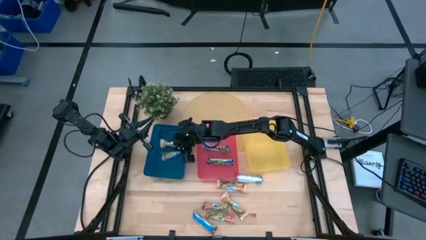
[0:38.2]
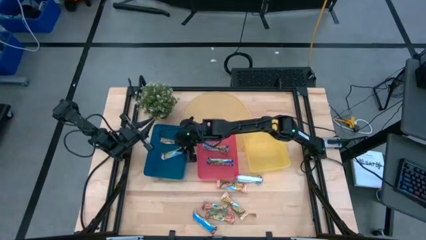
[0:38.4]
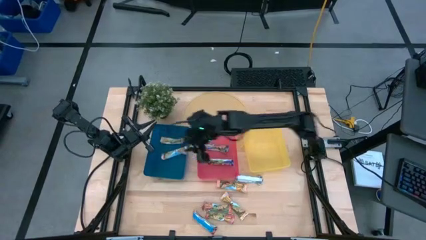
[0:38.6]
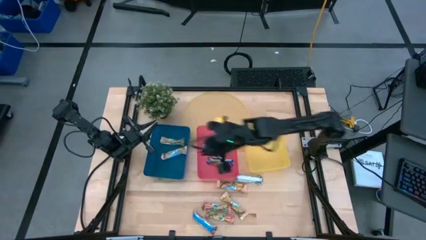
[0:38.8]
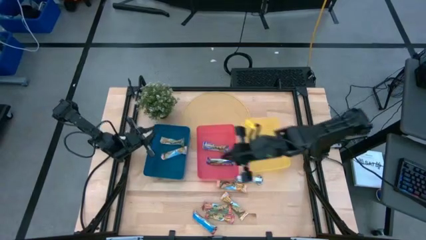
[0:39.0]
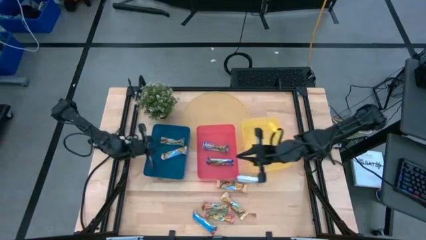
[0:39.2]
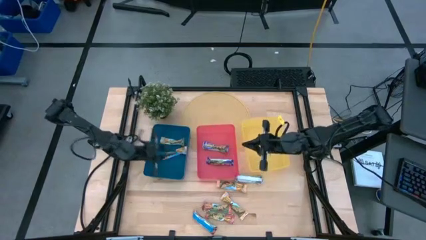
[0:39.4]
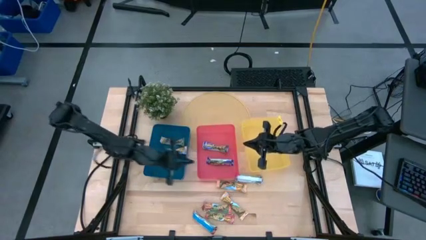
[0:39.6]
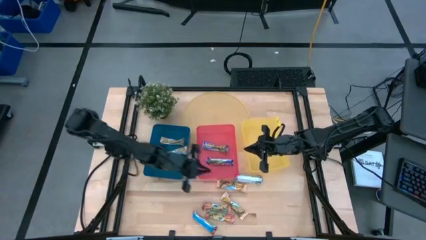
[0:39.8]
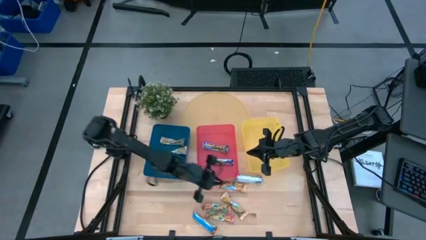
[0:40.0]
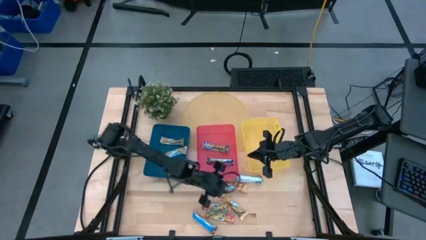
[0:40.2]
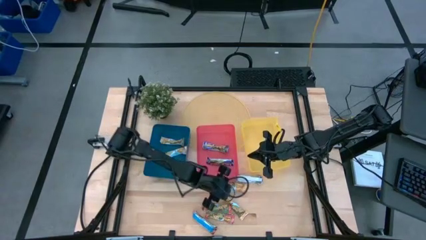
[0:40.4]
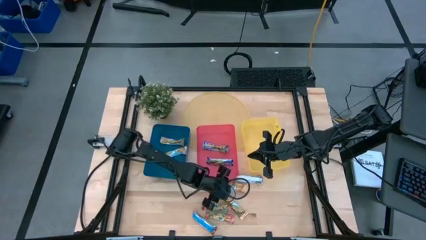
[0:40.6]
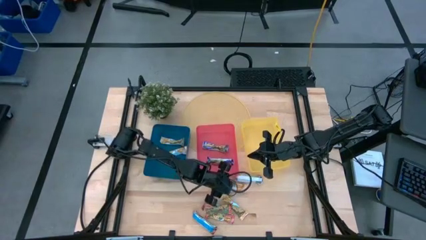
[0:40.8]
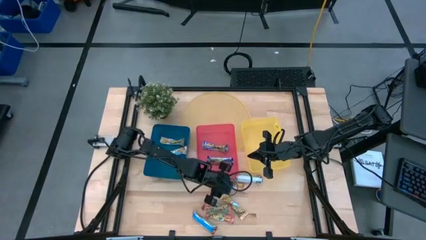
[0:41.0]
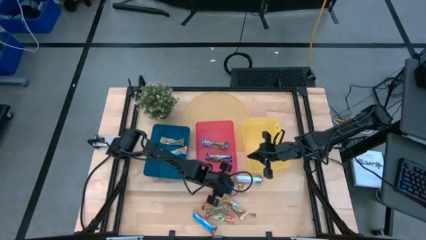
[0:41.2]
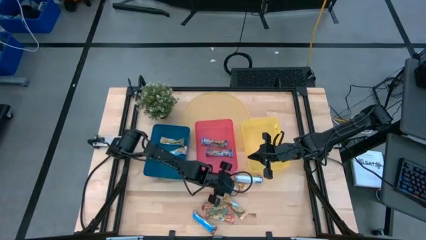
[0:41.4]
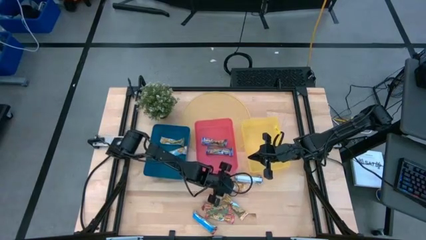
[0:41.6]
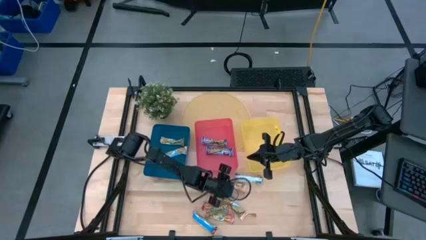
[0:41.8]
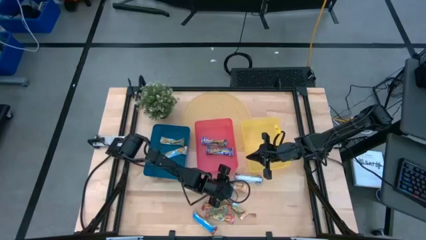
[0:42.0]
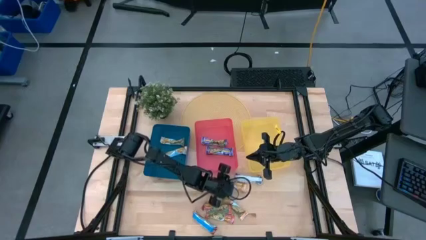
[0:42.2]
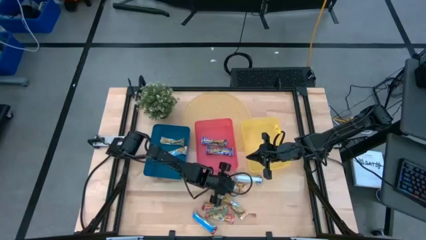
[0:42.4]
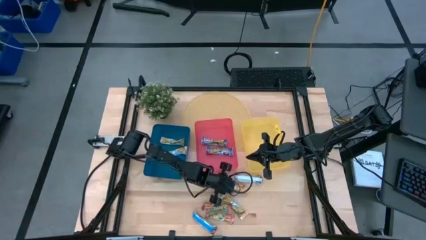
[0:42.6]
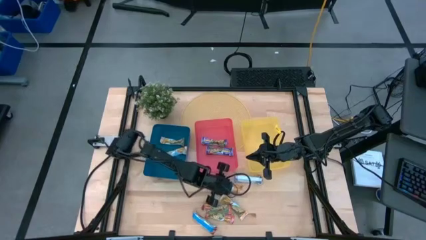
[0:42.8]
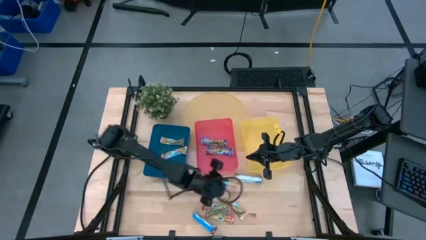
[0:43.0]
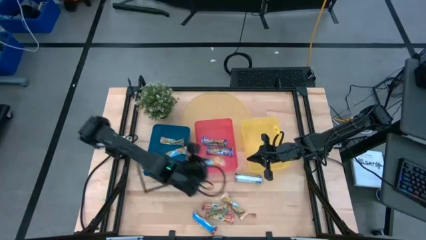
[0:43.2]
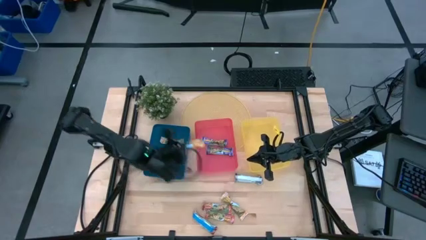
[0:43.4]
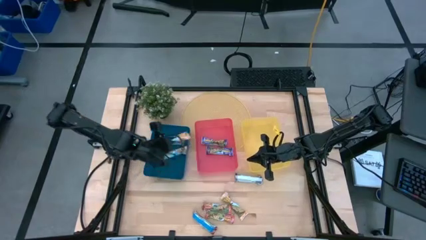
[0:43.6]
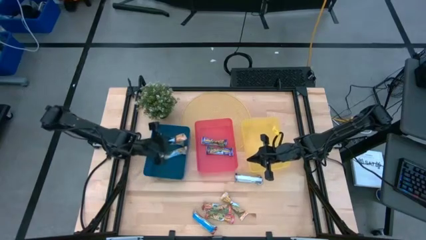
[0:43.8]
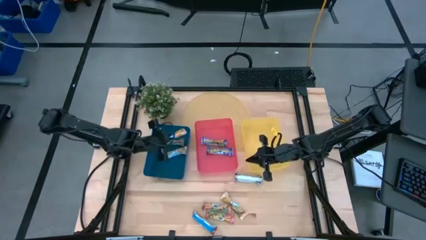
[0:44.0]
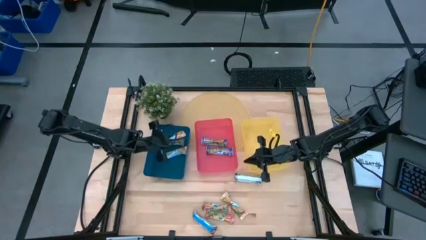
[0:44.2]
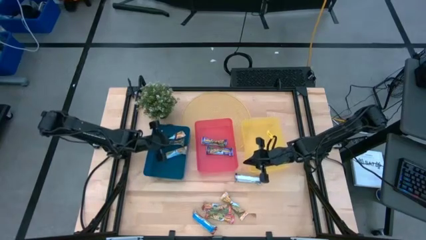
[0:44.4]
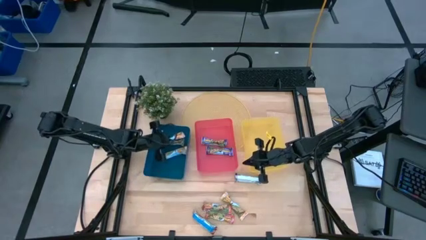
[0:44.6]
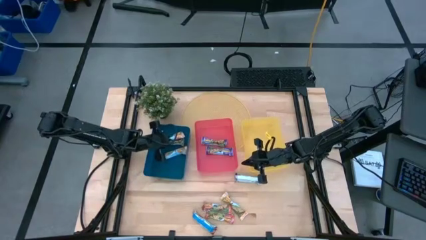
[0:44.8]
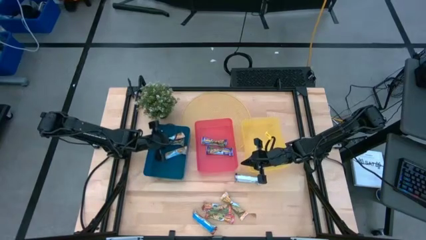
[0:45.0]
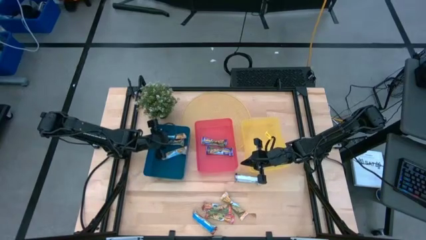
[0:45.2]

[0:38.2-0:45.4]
Task: Pick and place Granola Bars by type
Put the yellow granola bar into the blue bin

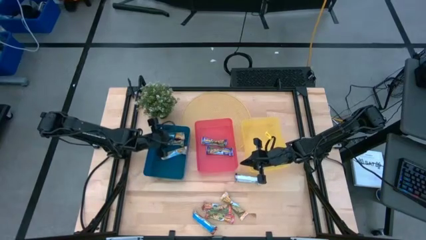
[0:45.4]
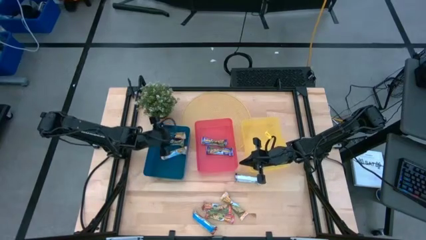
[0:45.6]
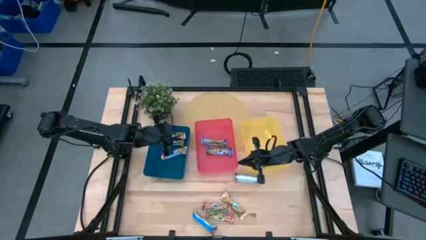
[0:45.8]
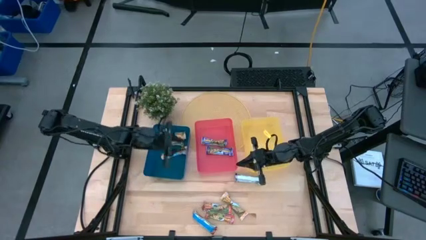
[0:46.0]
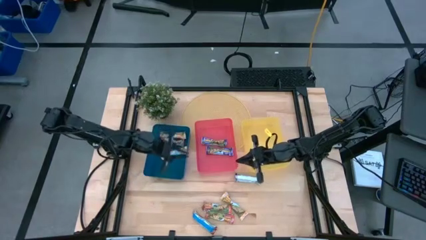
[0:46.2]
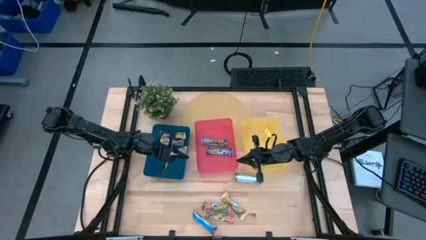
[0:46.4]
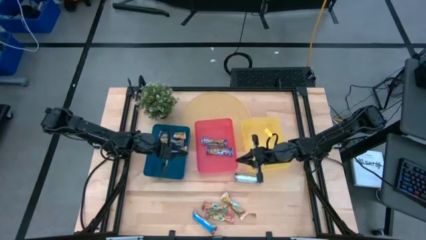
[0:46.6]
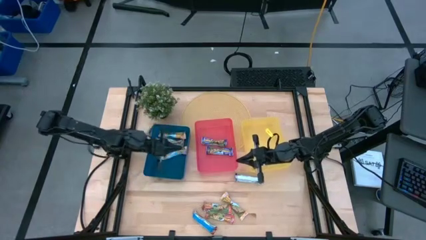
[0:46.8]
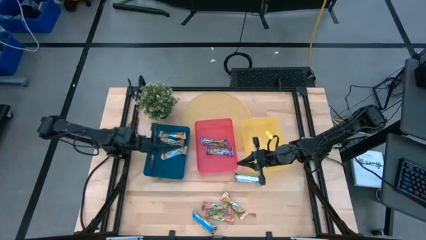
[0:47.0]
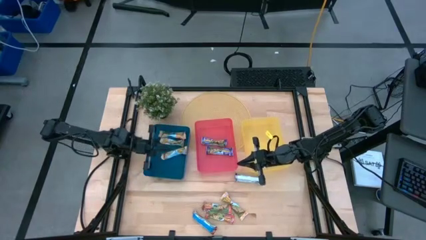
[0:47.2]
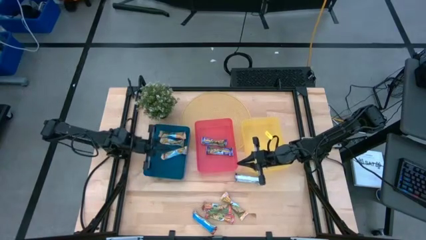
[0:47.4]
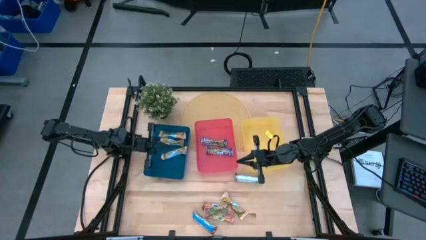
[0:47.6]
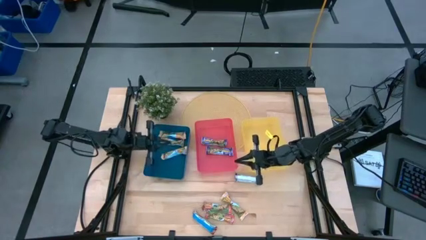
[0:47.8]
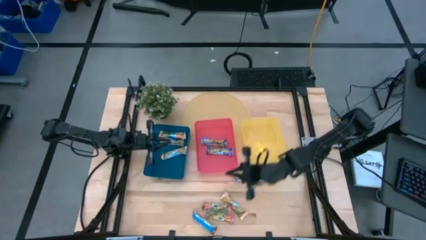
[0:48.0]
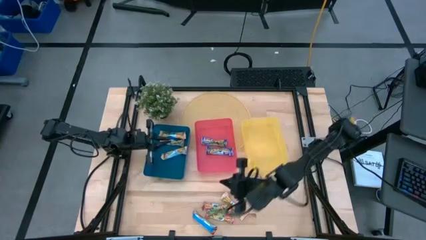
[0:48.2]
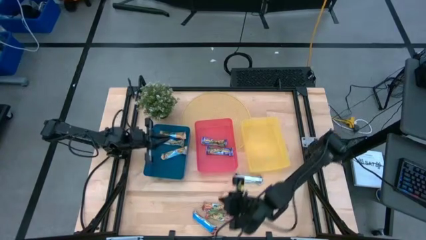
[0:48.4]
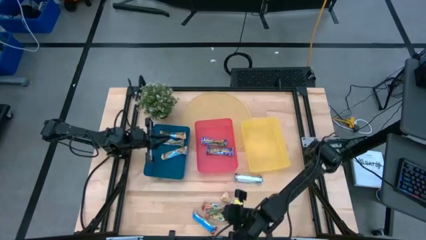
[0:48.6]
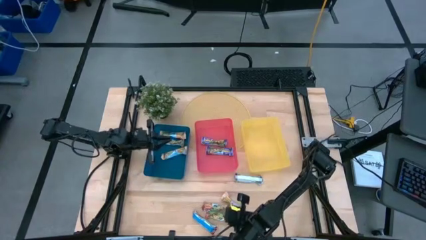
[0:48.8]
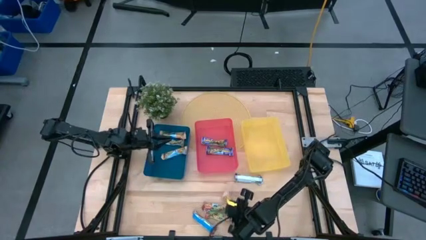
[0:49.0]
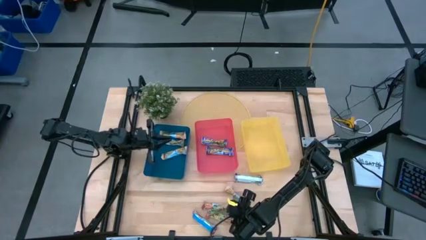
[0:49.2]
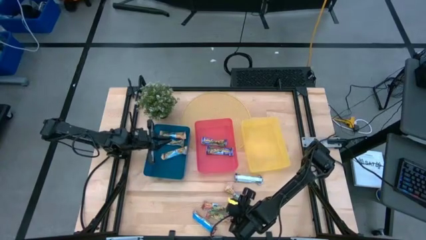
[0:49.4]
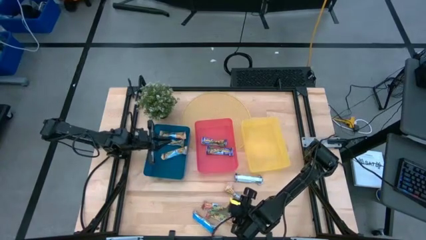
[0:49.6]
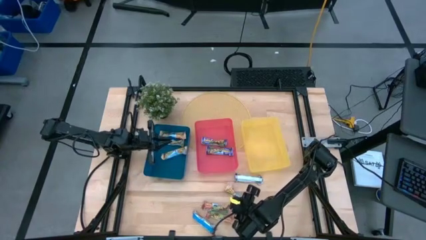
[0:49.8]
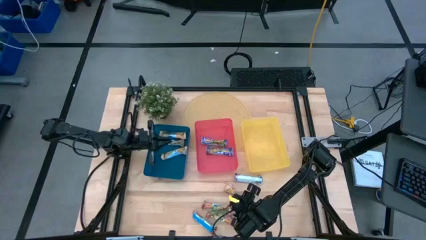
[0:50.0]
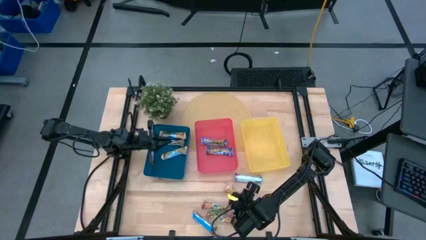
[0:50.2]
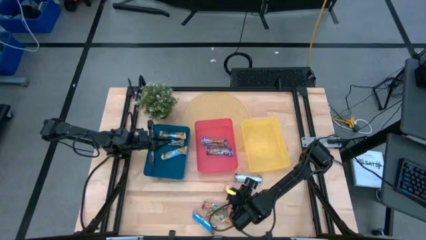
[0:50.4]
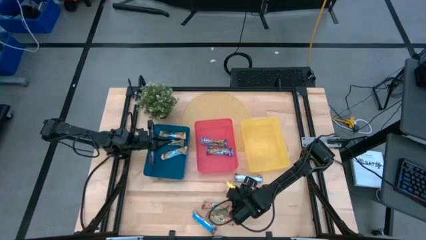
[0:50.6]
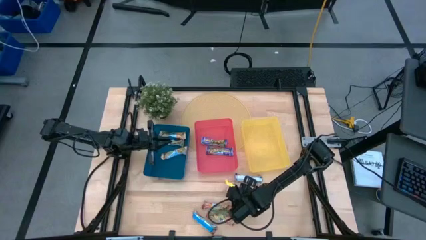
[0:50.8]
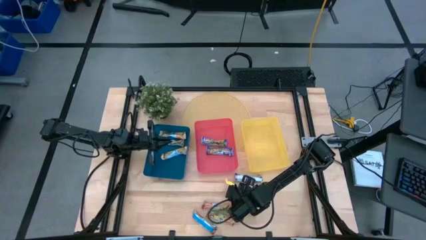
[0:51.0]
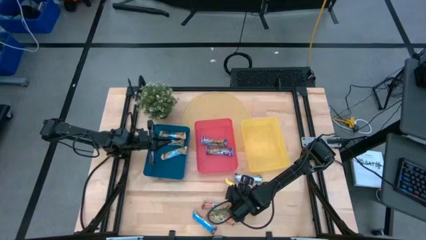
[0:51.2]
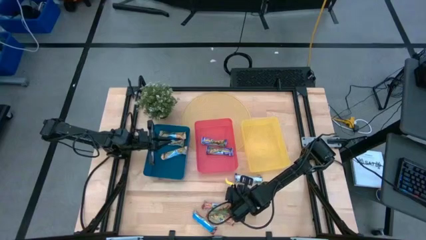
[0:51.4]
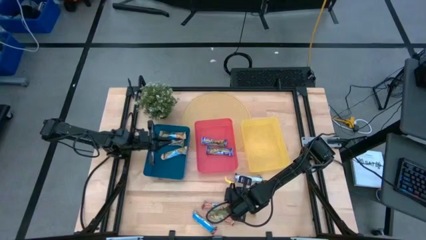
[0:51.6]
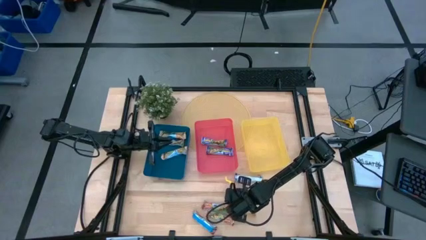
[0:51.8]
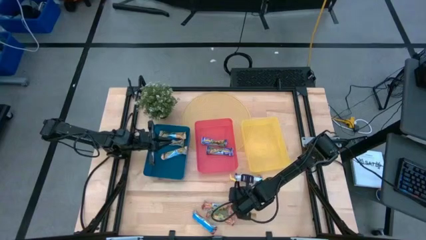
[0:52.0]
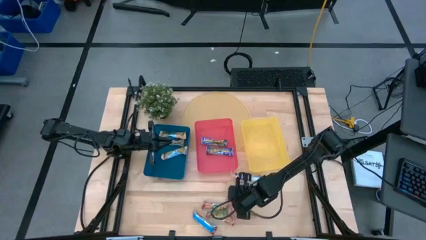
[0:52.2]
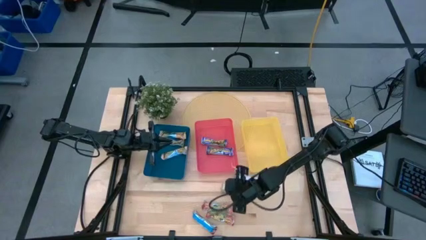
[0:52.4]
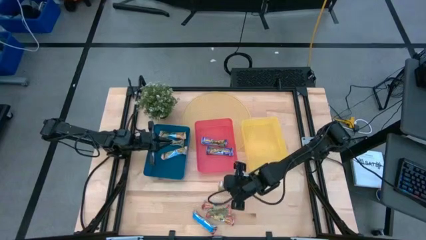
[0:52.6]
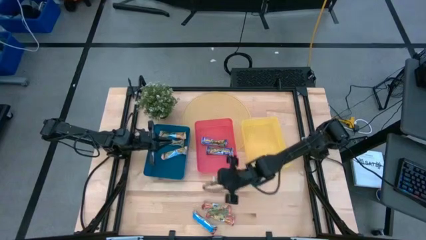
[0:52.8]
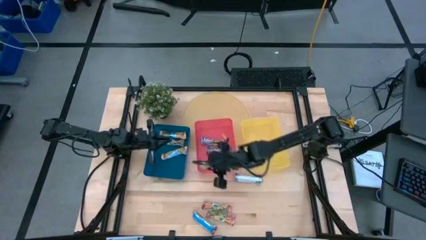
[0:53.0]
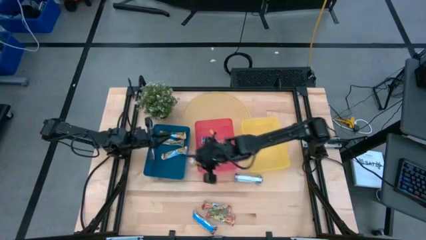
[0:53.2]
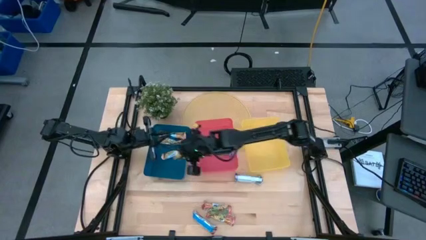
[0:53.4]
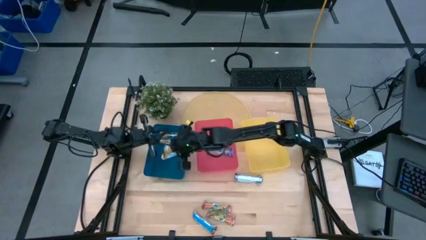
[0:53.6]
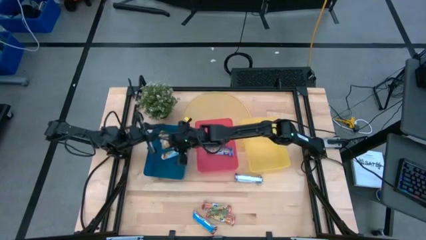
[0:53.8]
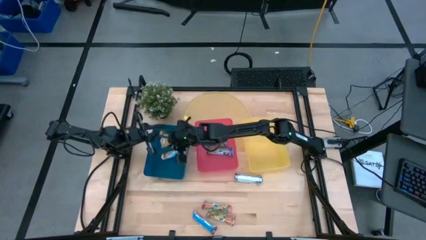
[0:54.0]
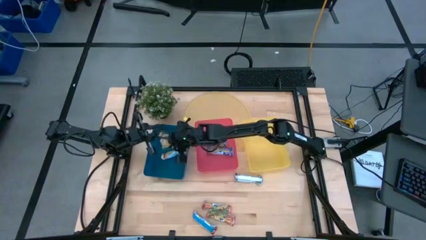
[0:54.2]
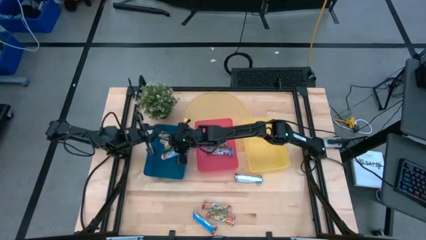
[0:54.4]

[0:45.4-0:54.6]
Put the yellow granola bar into the blue bin

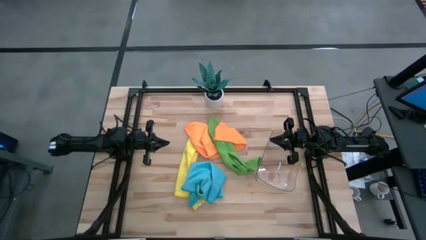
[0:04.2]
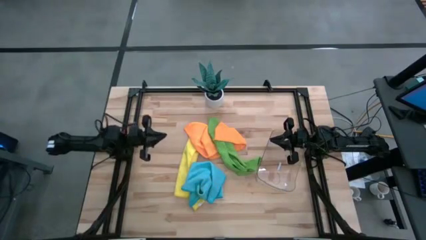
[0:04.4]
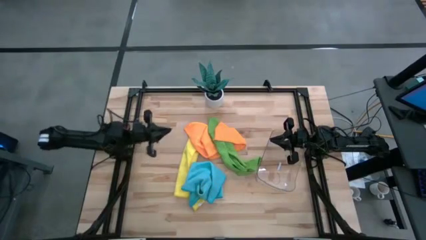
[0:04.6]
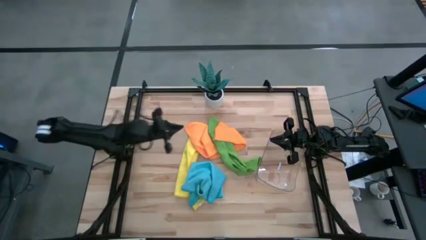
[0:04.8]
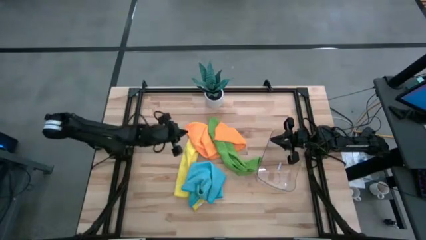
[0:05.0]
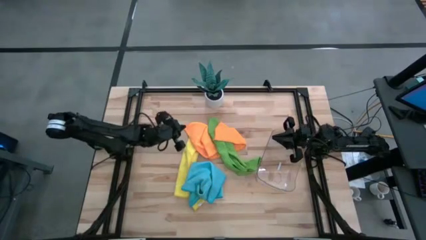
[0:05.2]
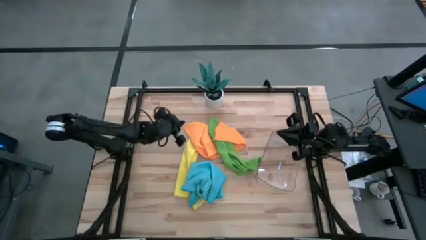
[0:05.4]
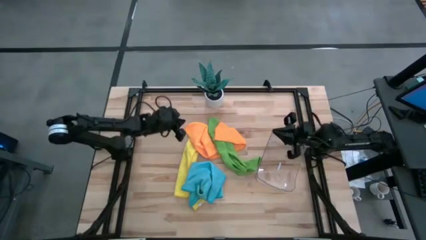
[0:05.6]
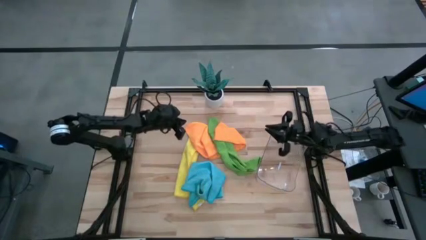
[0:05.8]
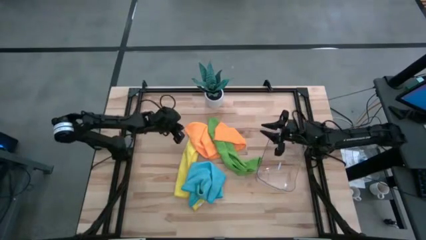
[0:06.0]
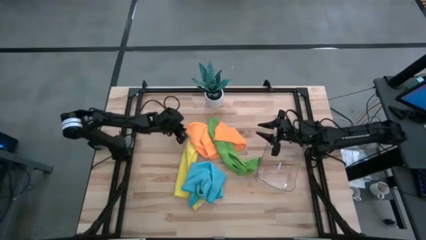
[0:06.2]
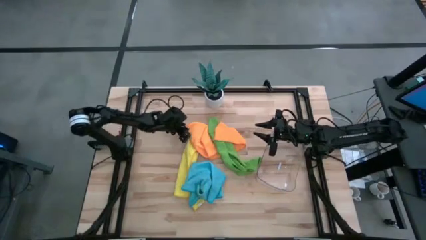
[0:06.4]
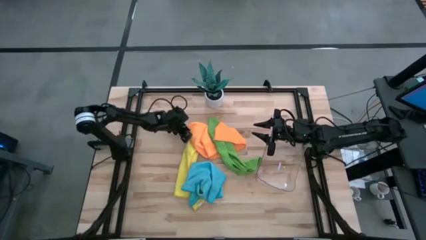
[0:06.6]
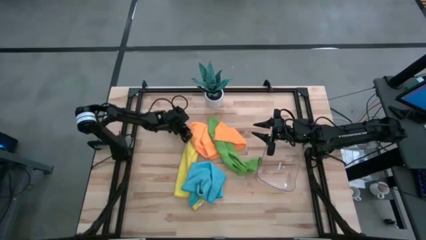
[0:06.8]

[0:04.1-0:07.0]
Task: Roll microfiber towels into tight, uniform cylinder then place into a basket
Move the orange microfiber cloth from center to top right
